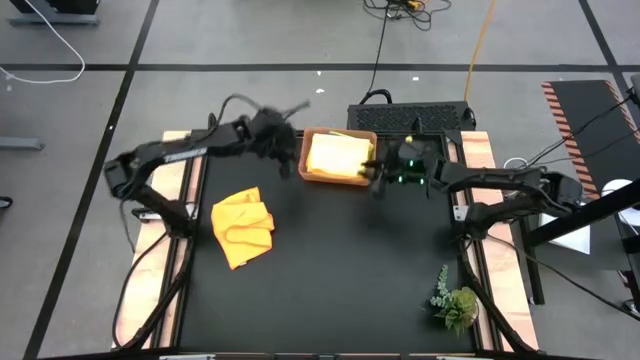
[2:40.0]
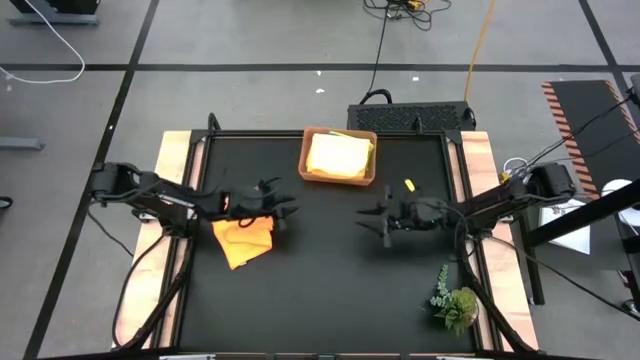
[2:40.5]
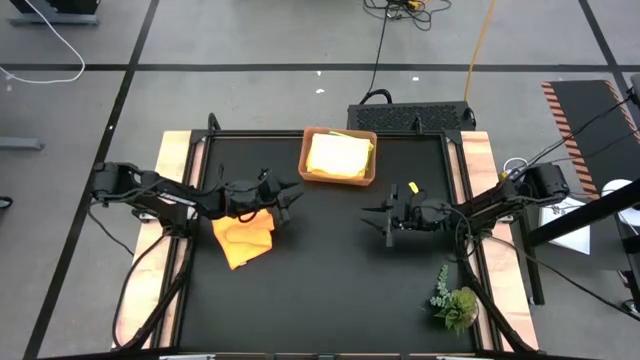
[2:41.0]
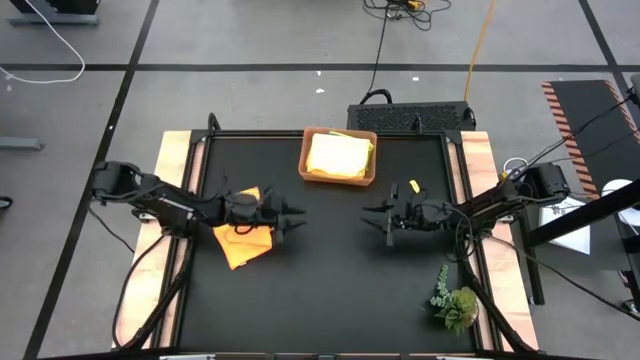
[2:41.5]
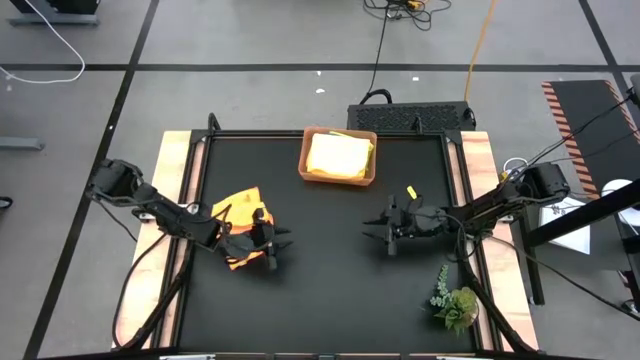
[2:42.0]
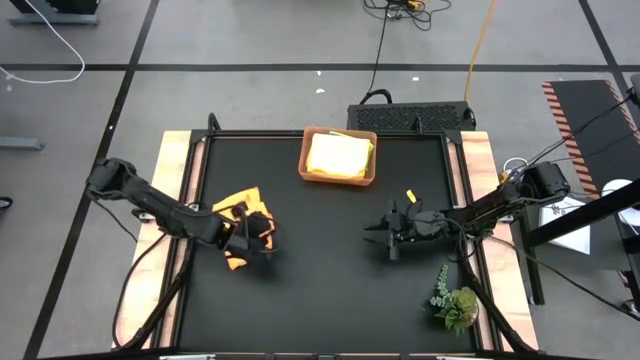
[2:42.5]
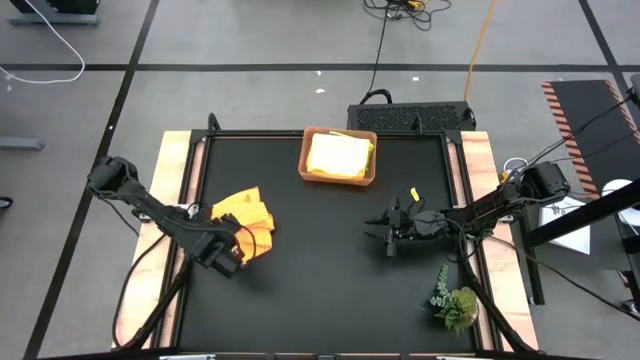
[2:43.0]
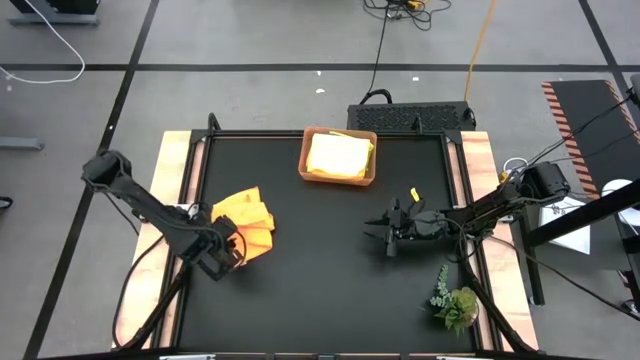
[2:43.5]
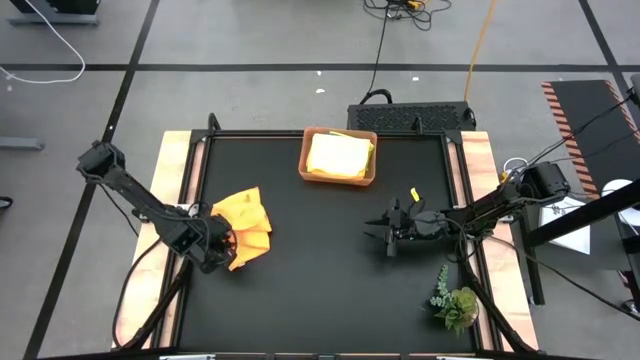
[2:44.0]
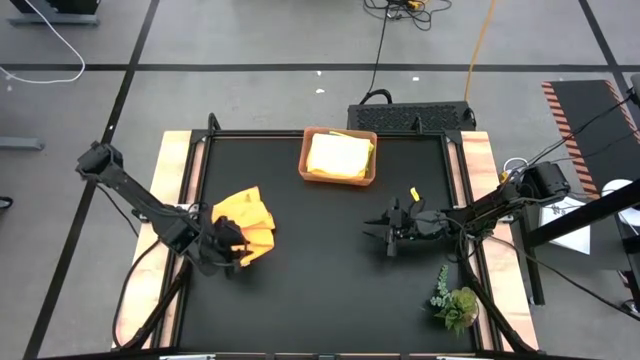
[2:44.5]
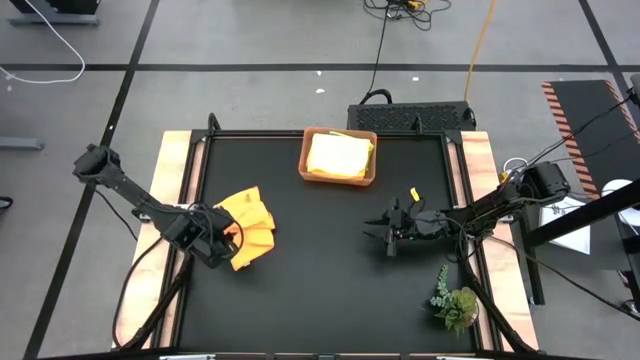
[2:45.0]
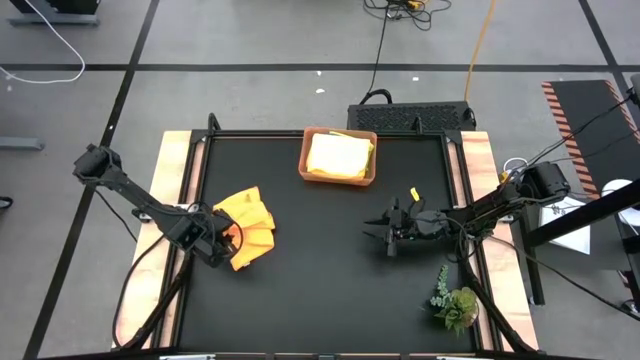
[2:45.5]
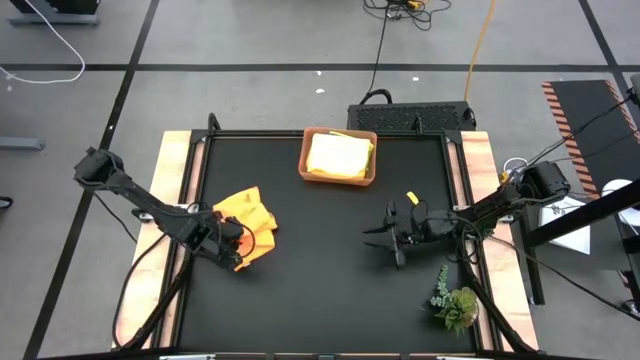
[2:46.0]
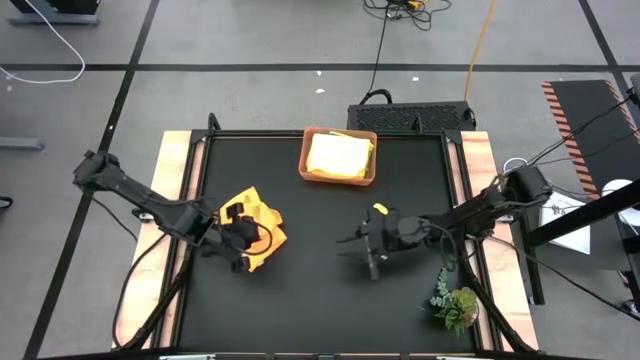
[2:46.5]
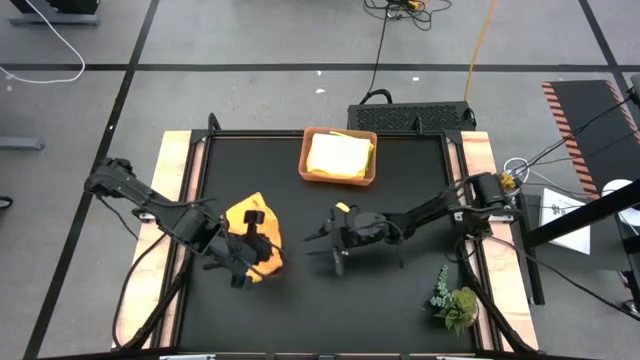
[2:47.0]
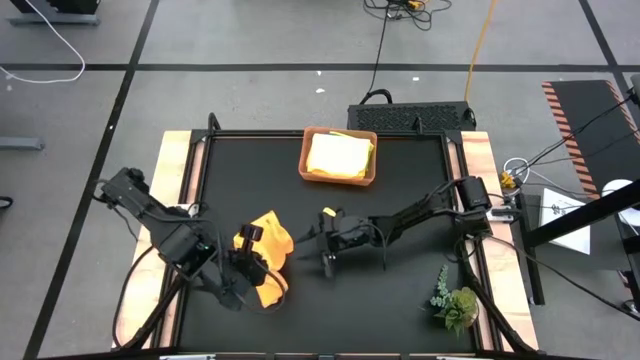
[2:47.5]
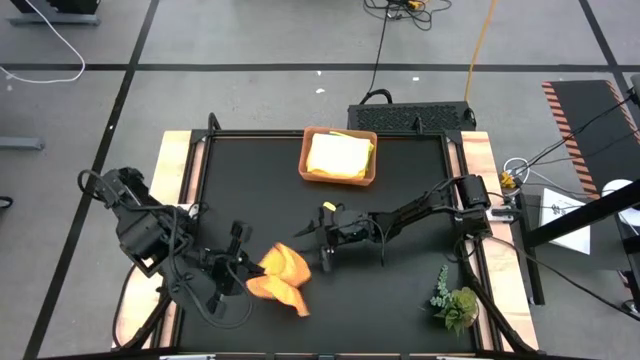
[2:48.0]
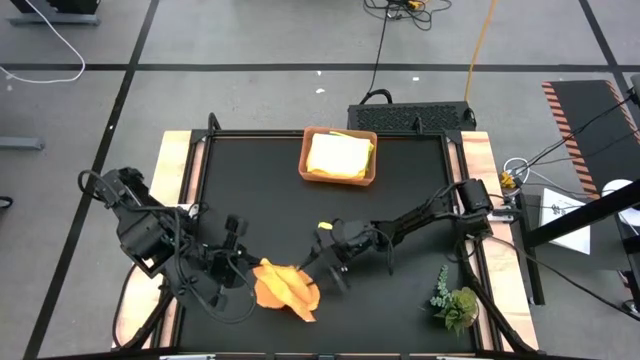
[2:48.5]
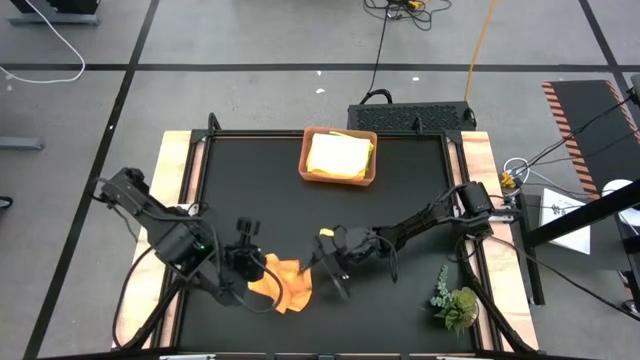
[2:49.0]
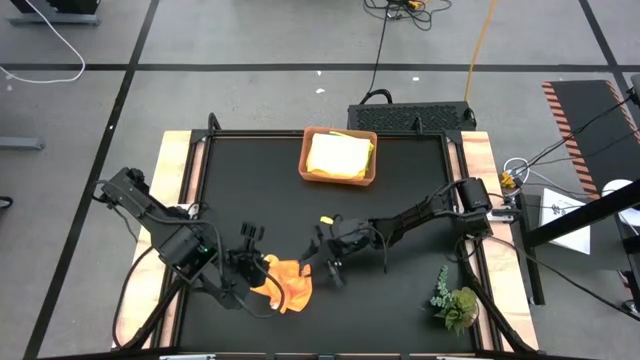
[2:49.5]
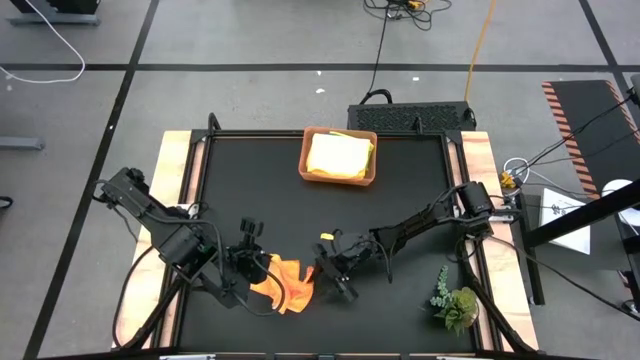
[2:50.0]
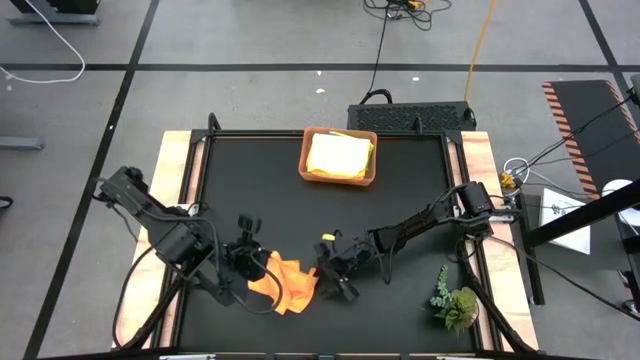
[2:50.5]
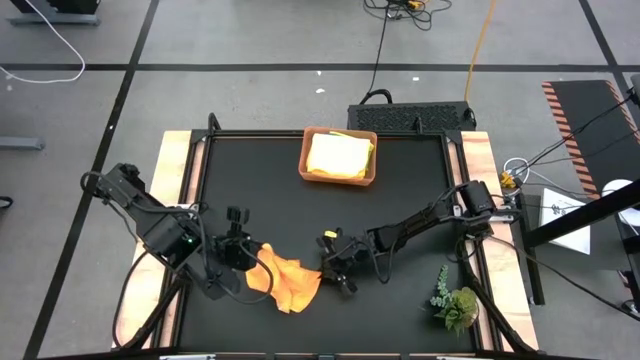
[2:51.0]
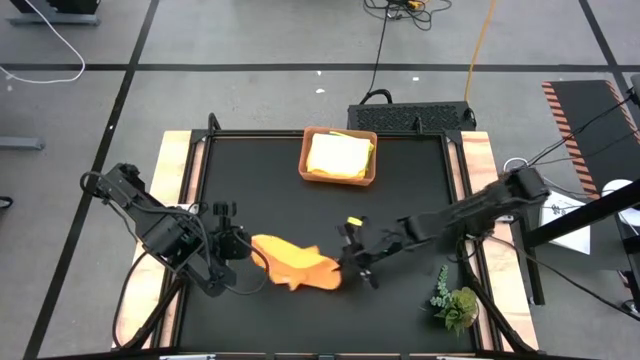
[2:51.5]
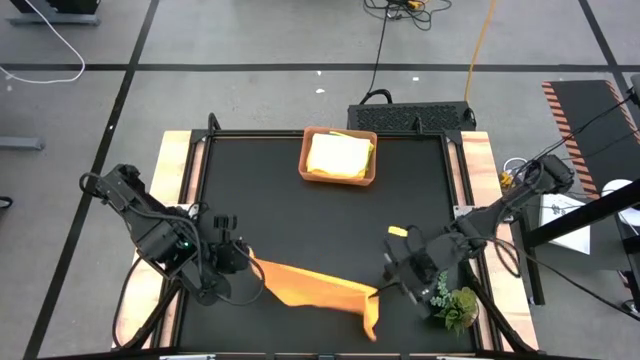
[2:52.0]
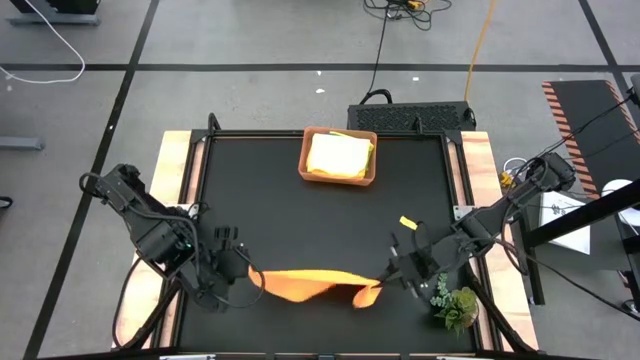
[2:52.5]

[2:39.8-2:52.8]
Task: Fold microfiber towels
Fold the orange microfiber towel

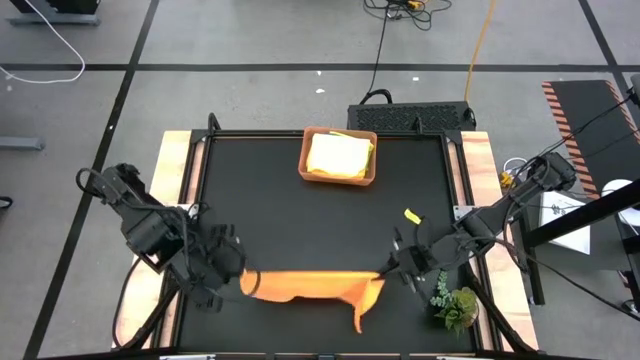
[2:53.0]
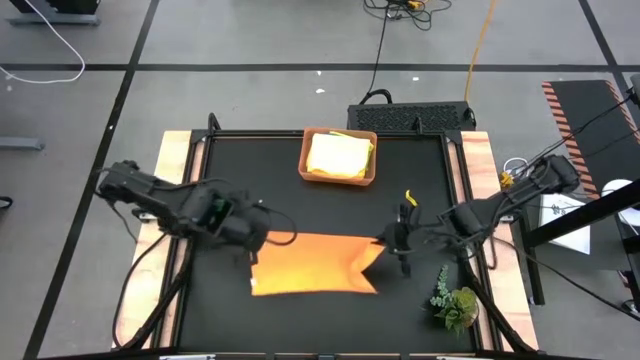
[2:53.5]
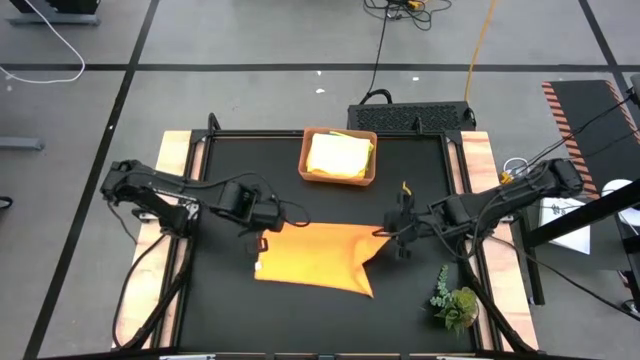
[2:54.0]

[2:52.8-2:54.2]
Fold the orange microfiber towel

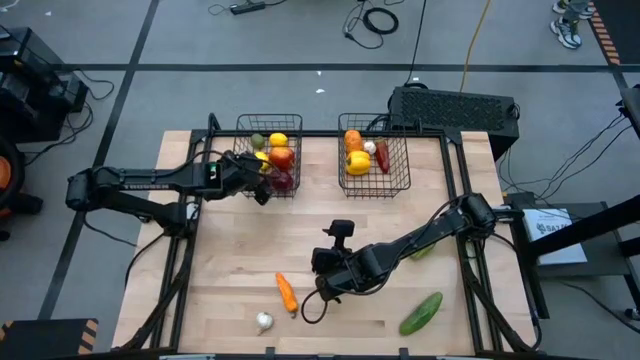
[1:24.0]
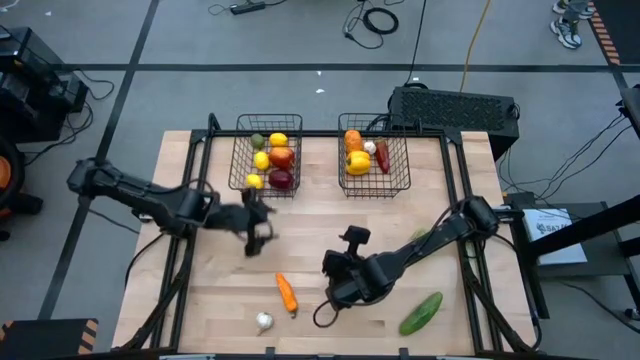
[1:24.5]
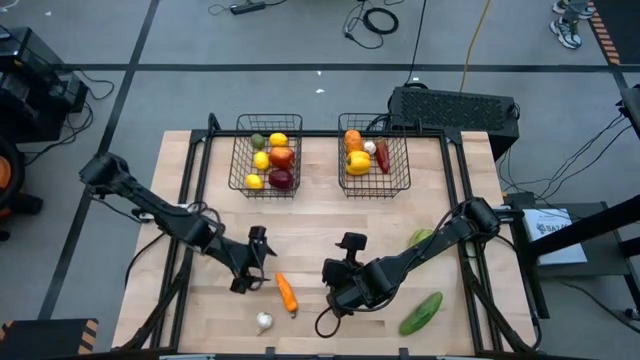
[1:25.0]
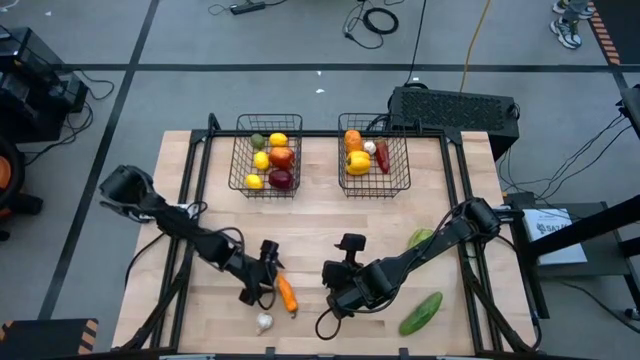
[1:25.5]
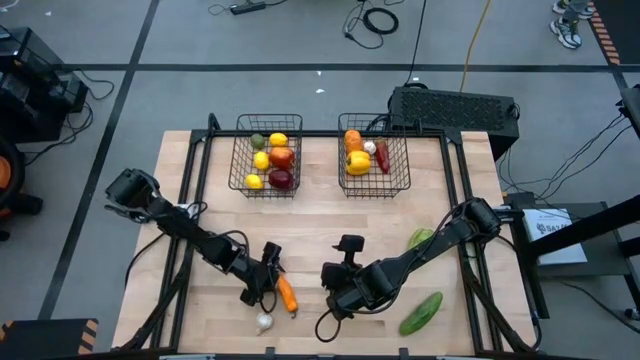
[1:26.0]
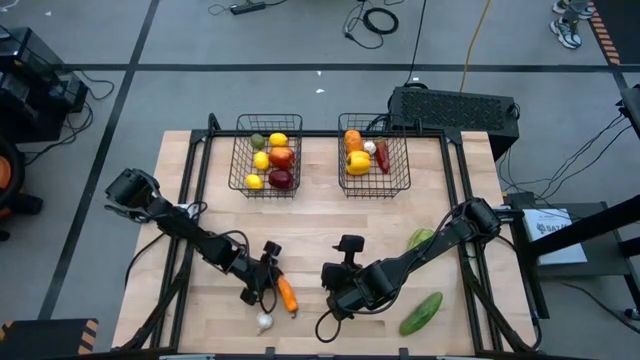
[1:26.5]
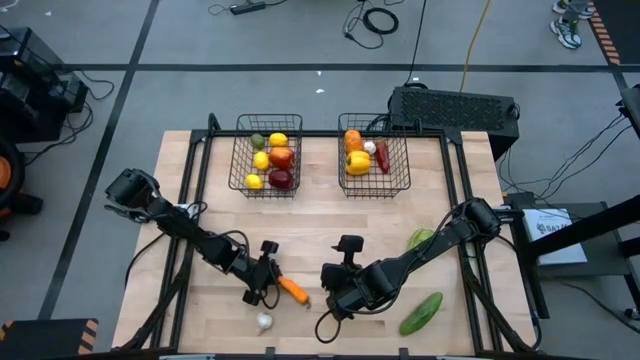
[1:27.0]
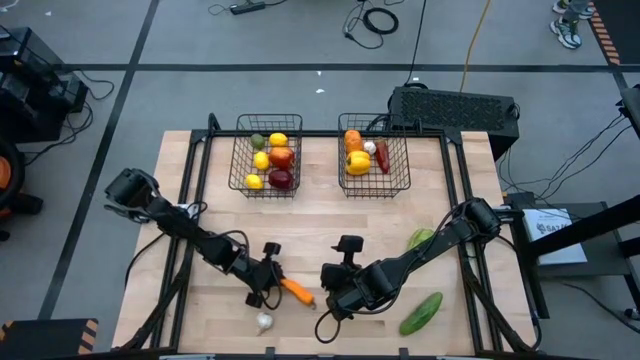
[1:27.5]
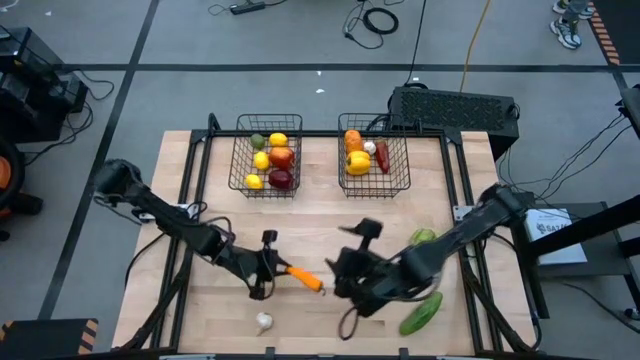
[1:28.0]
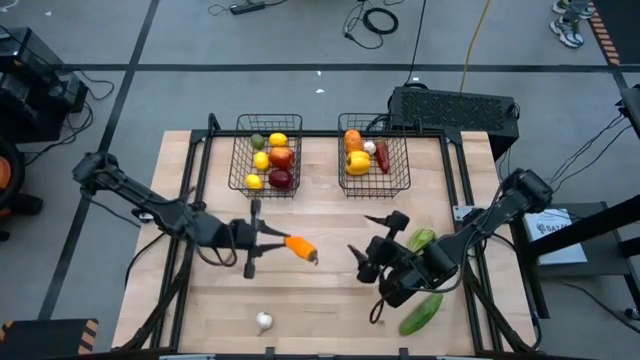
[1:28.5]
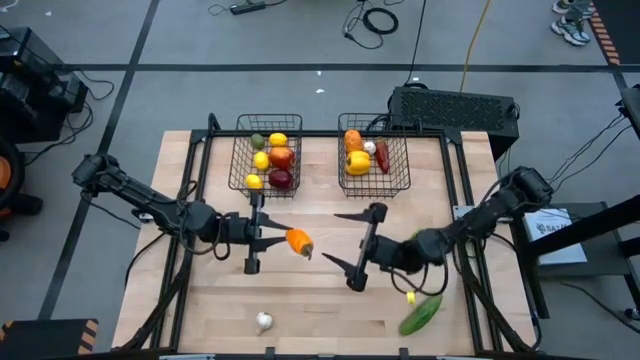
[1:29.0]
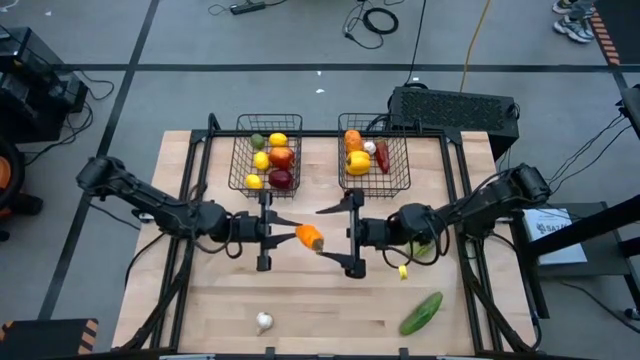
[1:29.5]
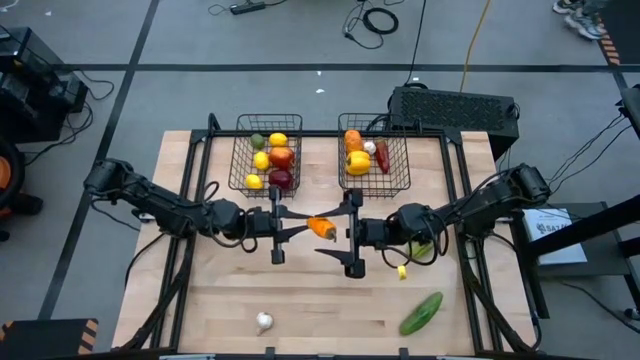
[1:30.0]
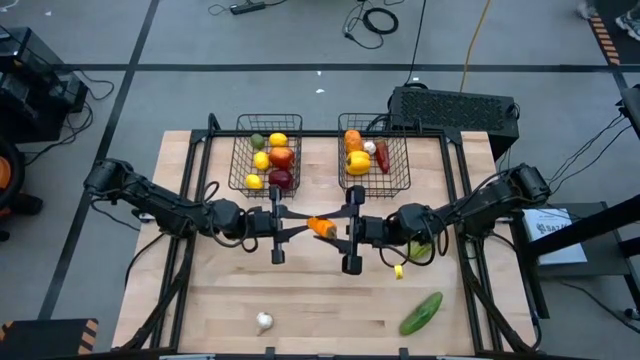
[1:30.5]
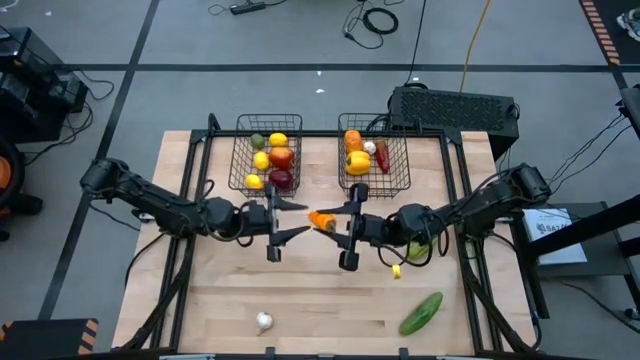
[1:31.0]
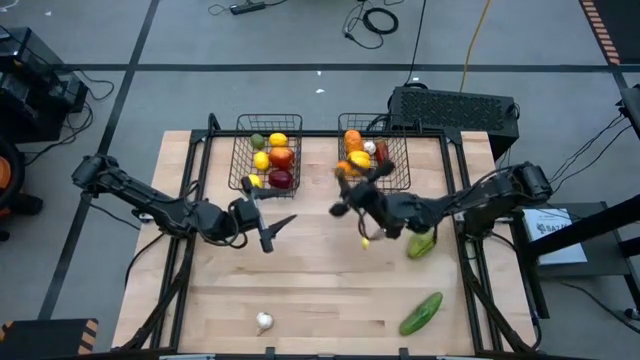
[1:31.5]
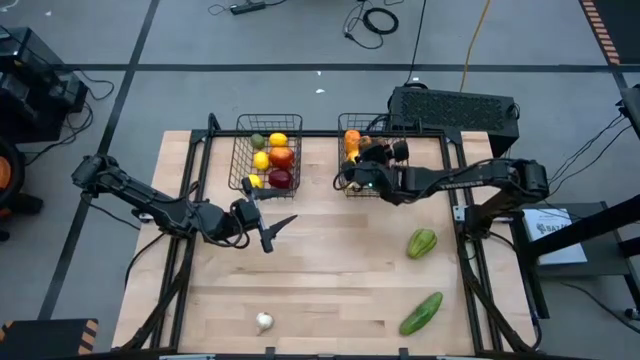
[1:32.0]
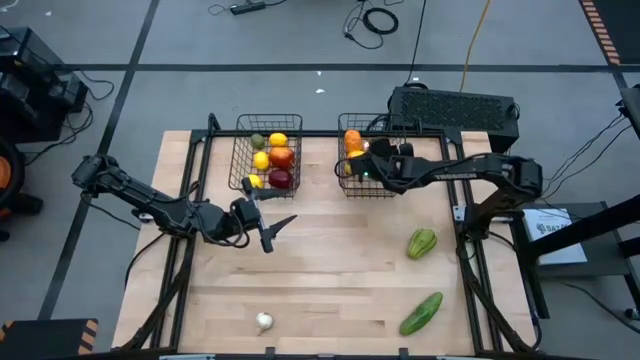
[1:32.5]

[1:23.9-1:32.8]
Task: Sort produce into baskets
Put the orange chili pepper into the right mesh basket
